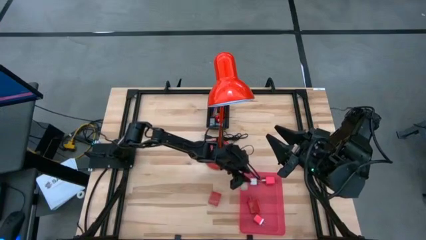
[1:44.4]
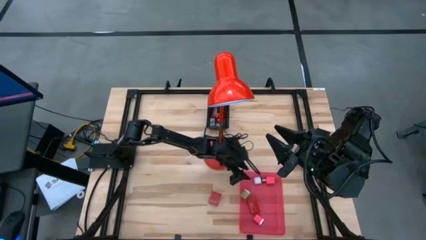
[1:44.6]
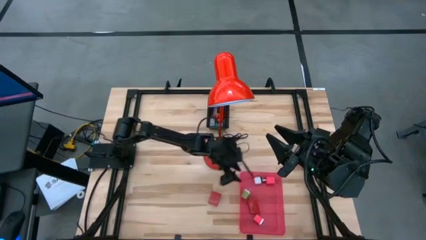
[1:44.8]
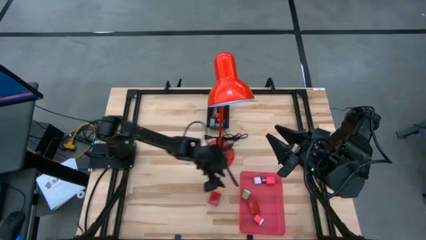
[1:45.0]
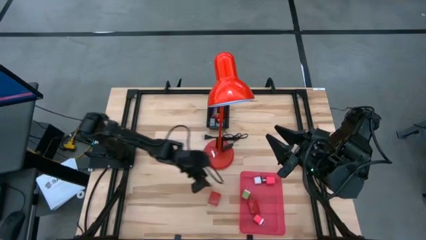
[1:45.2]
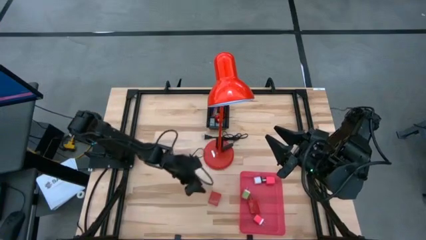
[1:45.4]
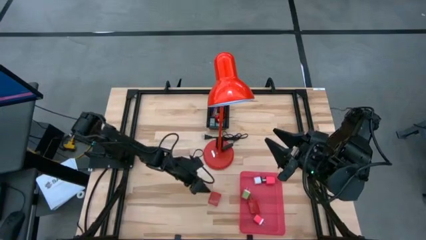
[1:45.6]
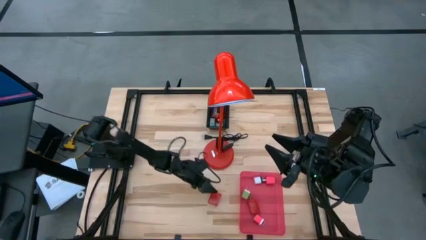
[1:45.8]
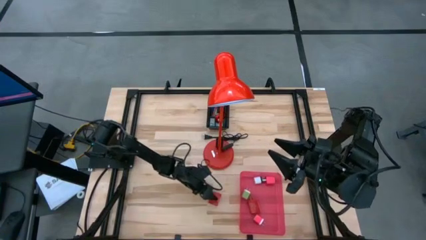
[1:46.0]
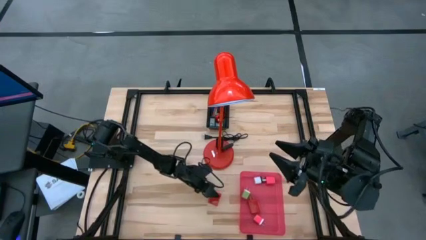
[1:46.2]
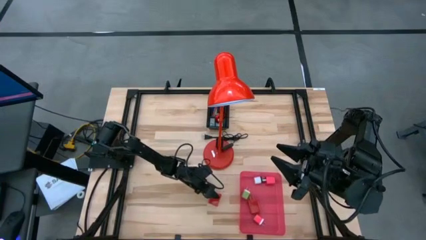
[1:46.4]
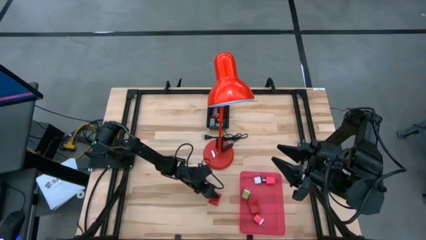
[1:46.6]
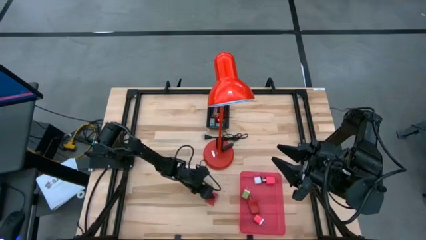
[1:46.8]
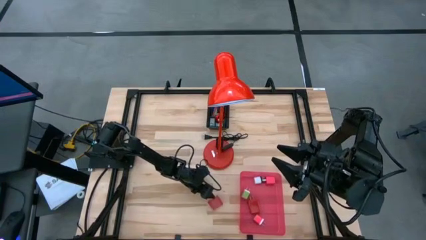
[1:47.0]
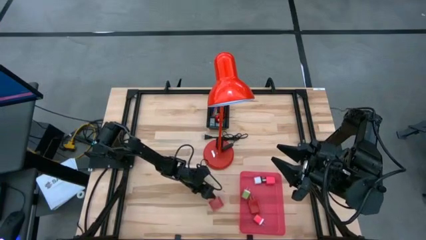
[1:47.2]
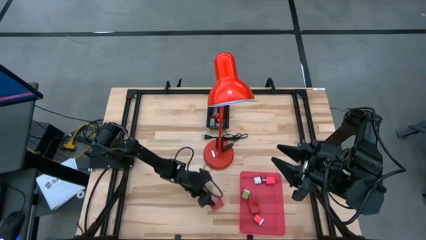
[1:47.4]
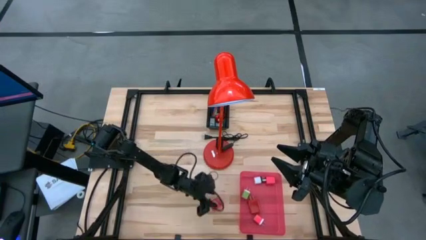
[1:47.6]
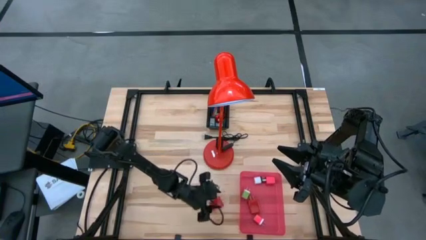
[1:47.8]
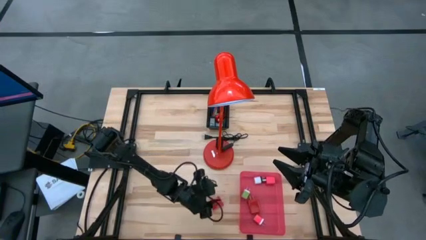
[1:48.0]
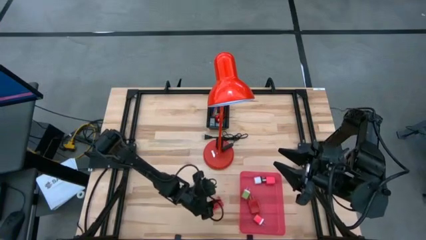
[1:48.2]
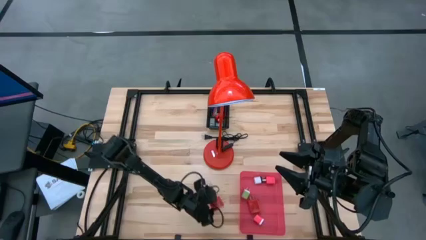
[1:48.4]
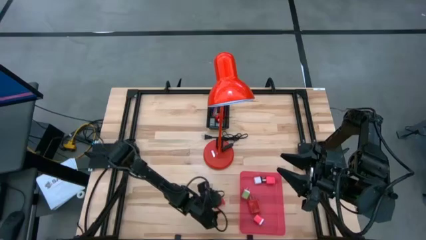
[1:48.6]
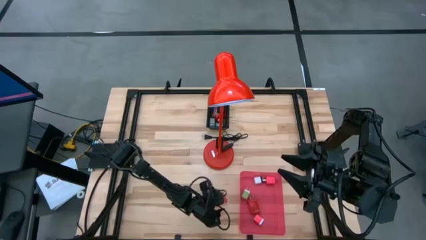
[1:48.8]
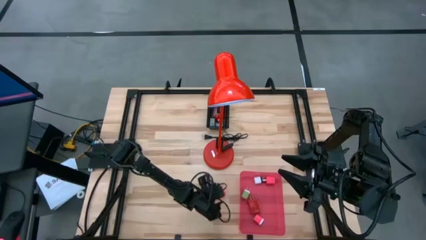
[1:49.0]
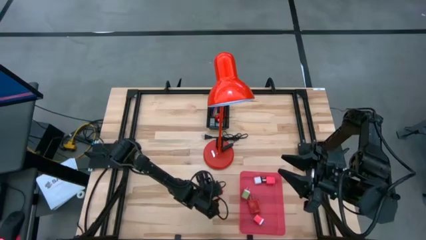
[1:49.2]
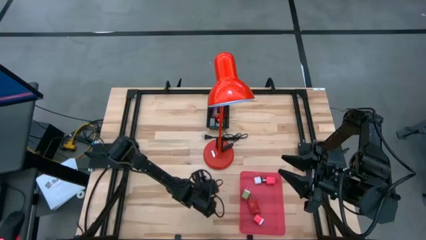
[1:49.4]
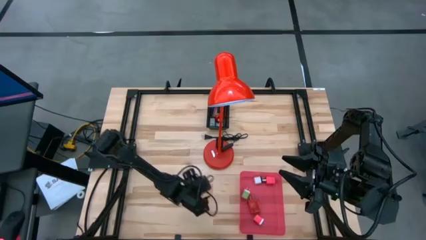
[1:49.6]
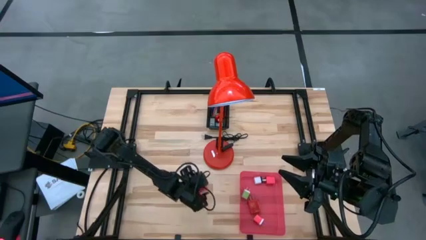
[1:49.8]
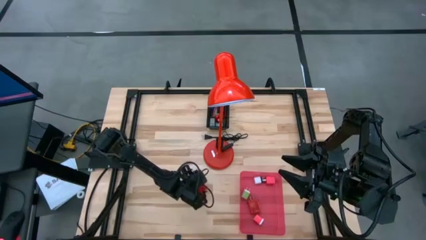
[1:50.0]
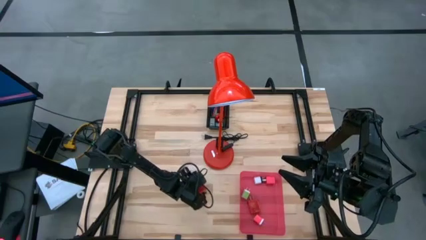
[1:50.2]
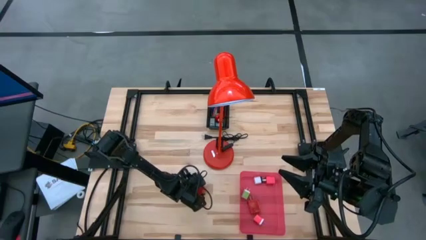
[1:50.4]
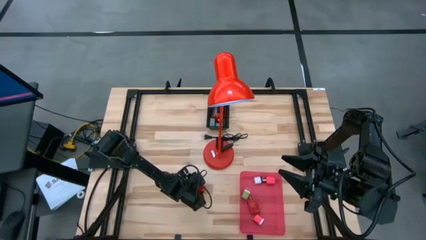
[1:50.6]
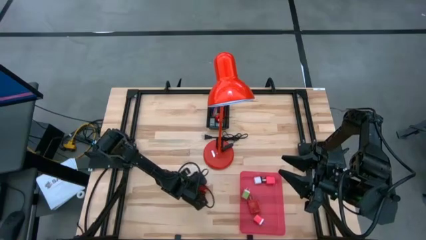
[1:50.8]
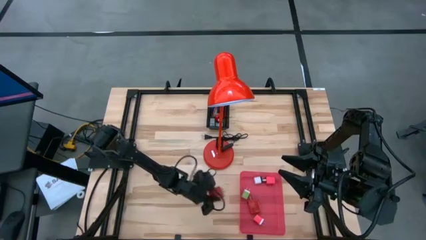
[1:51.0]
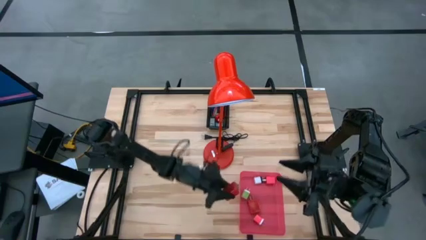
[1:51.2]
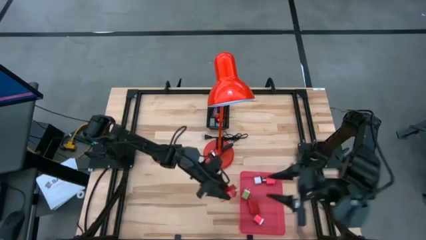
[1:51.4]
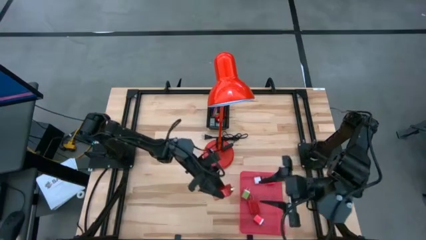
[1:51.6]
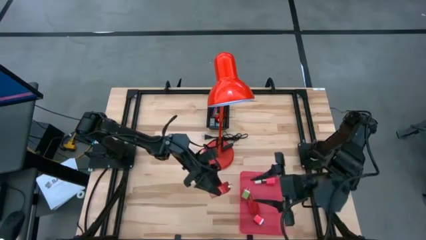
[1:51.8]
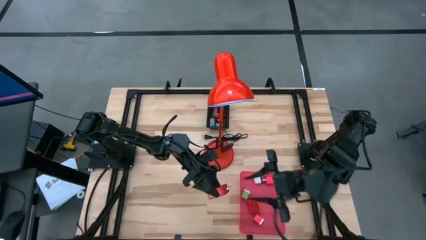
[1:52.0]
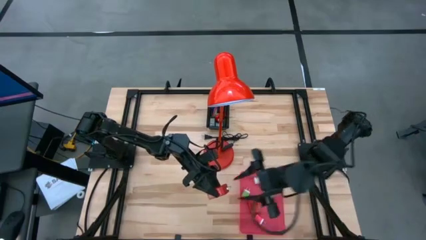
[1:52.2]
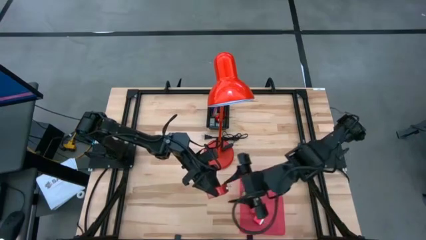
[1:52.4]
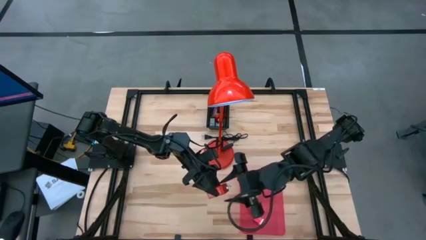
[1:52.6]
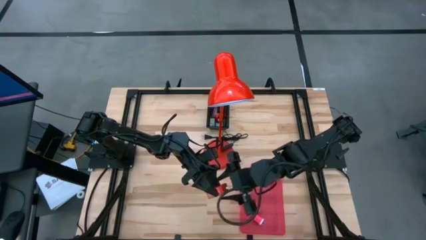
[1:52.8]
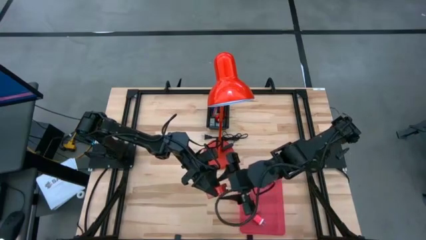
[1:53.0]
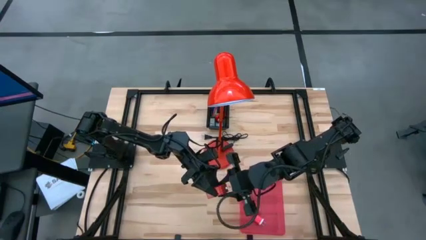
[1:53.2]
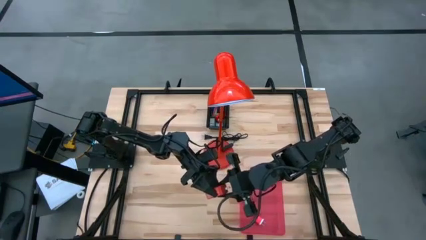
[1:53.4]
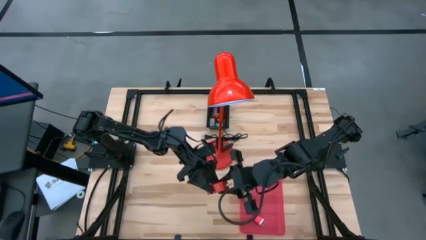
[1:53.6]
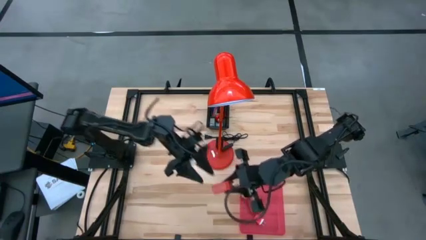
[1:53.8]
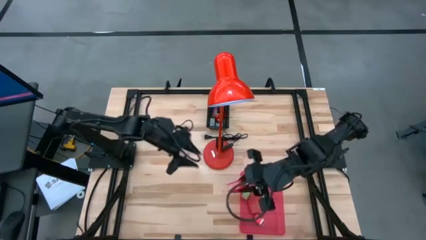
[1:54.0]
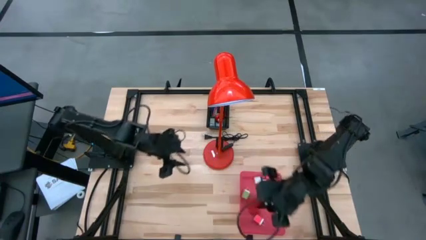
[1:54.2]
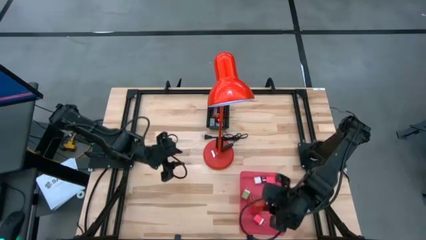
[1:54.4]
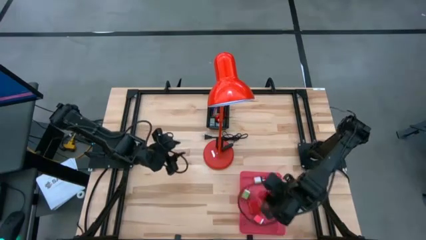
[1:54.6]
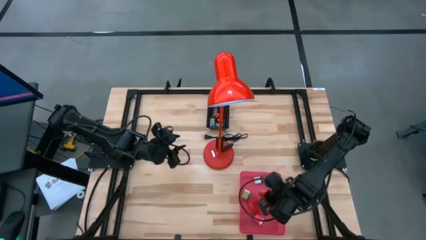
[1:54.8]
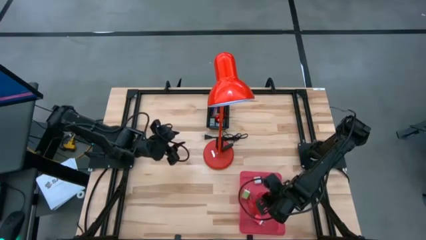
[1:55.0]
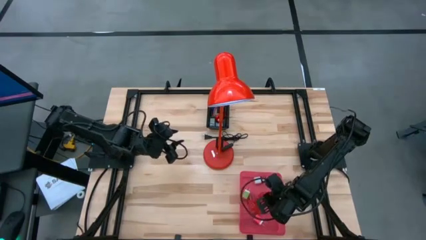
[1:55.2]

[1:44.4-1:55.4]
Task: Pick & Place Office items
Put the red charger adapter into the red bin

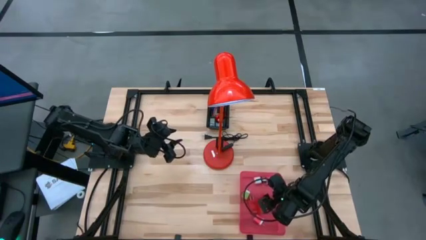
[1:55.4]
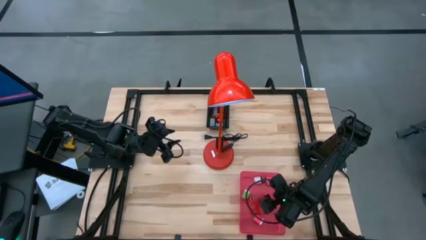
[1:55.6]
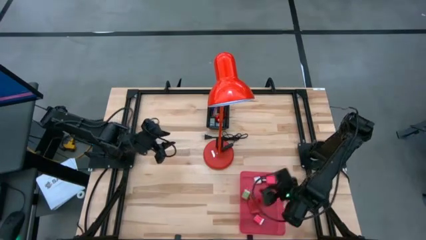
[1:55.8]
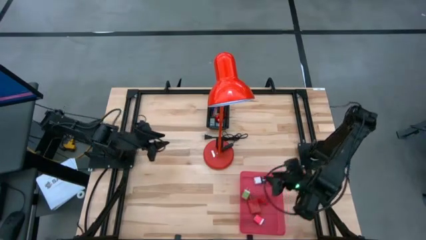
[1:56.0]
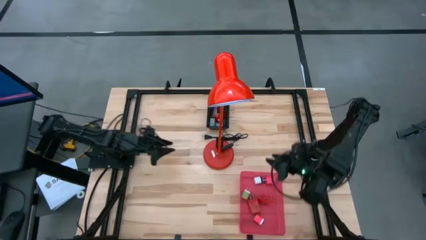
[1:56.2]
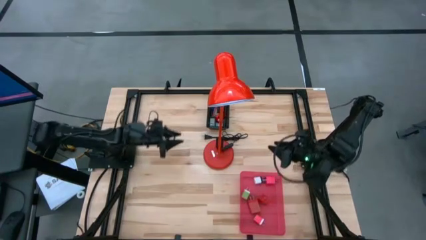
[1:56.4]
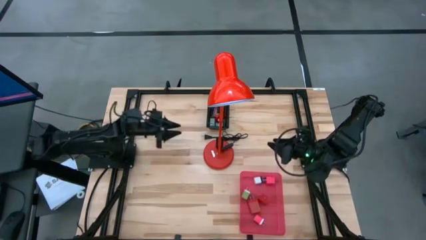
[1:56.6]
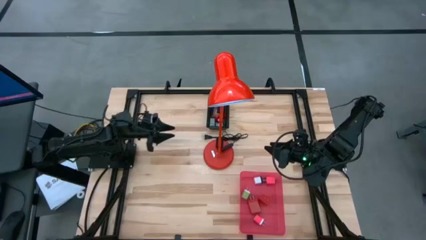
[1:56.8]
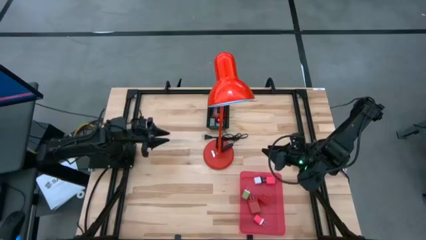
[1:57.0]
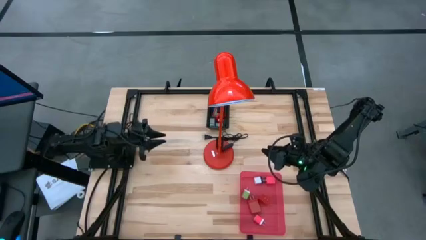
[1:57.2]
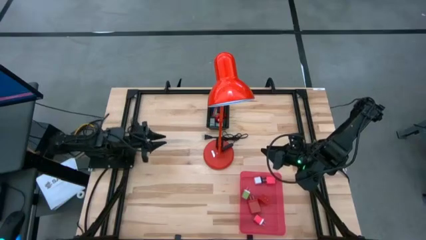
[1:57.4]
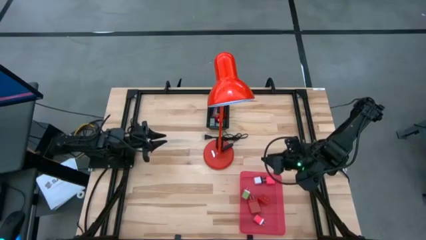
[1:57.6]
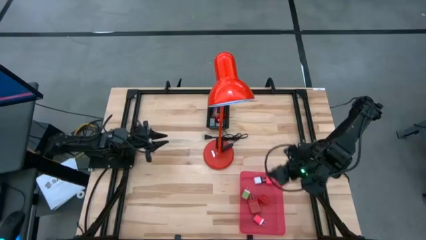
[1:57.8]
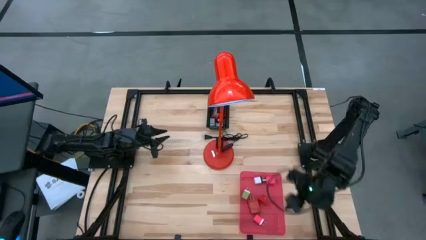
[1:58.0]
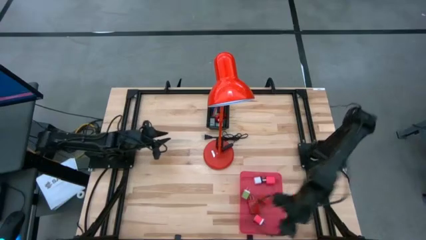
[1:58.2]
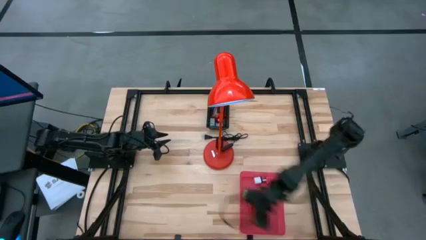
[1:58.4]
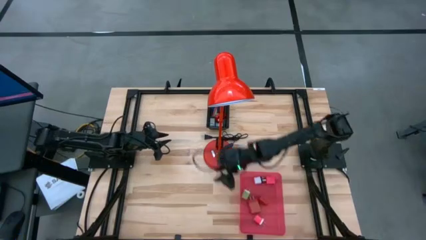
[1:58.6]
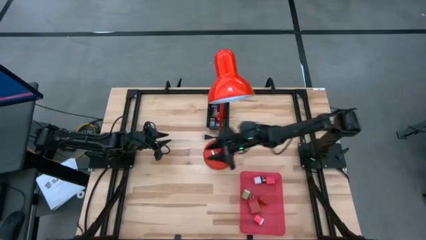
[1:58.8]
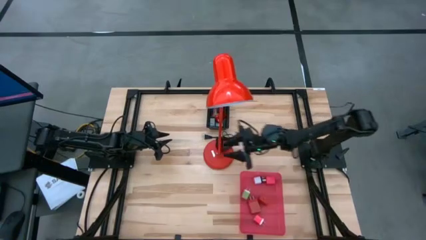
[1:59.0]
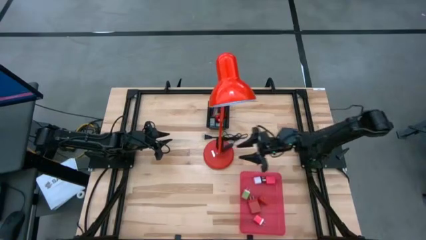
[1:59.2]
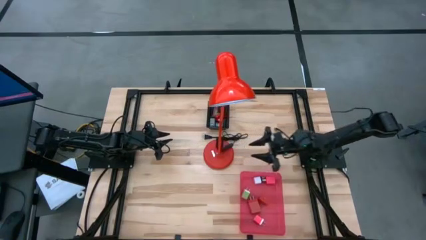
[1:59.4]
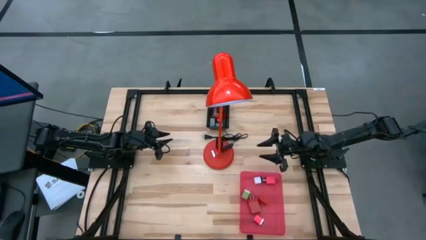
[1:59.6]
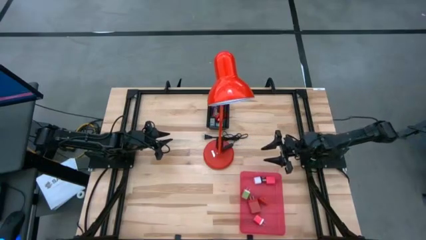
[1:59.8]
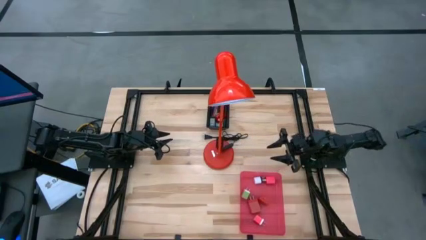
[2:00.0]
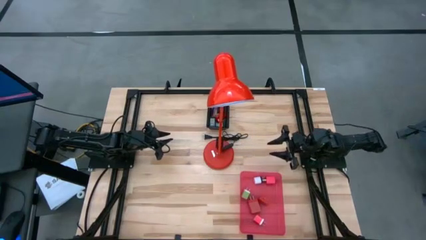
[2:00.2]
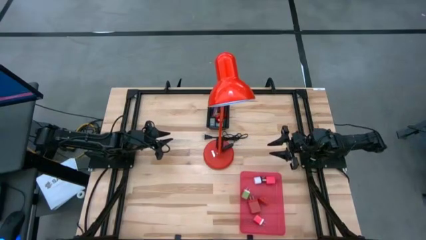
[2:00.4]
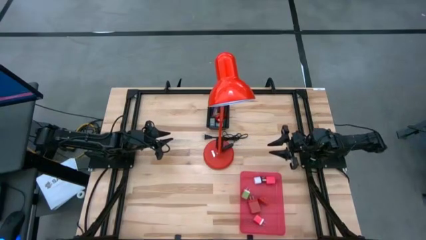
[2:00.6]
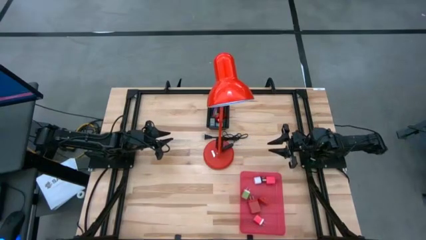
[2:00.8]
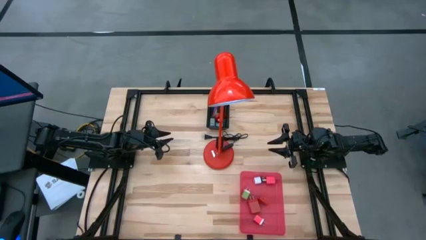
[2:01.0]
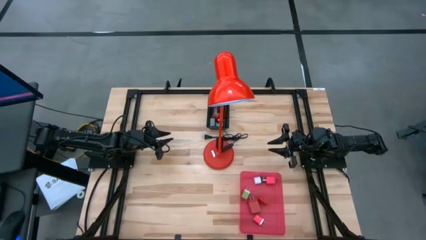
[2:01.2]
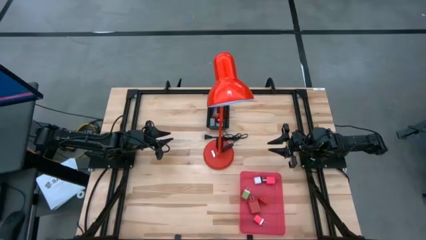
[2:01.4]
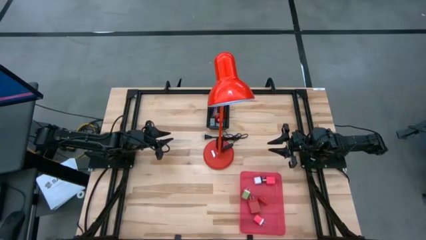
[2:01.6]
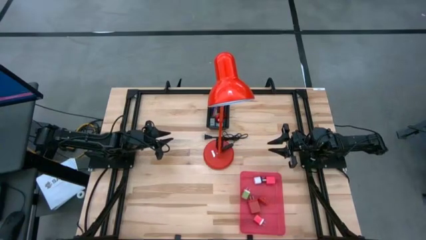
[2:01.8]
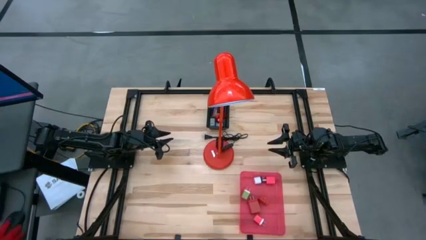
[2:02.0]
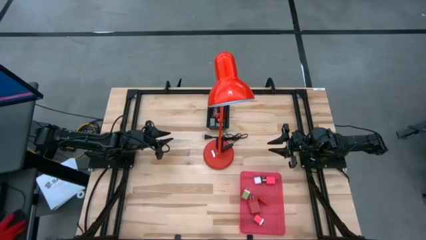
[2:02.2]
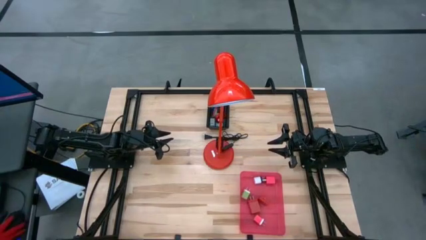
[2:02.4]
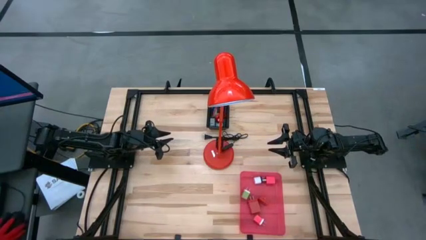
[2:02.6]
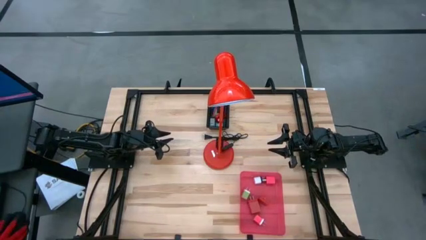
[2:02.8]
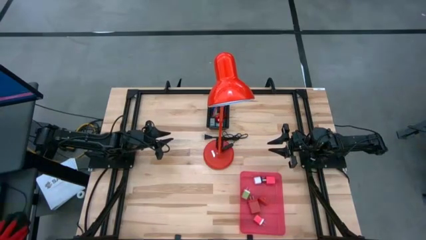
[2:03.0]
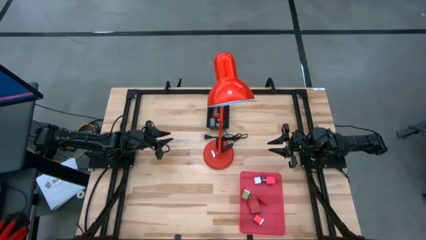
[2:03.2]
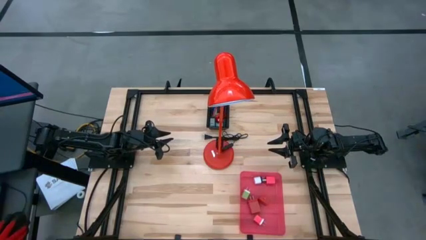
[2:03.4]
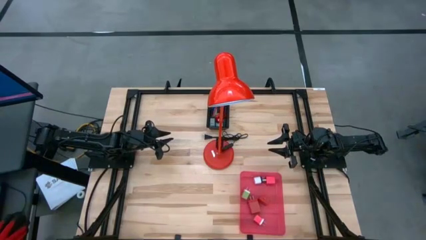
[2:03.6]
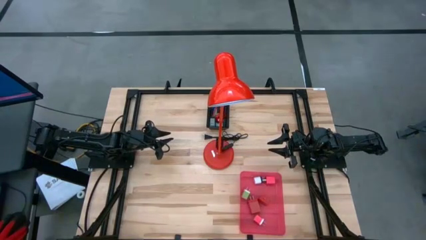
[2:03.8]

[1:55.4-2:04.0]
Return to Home Position
